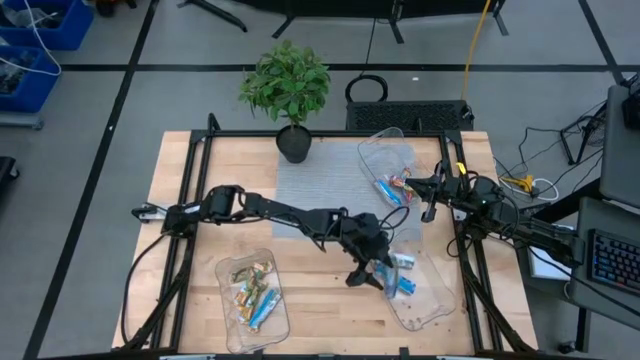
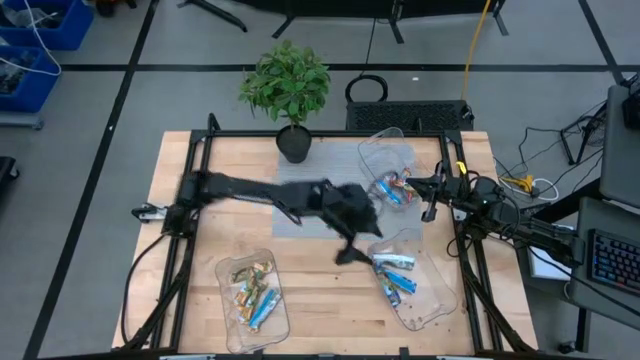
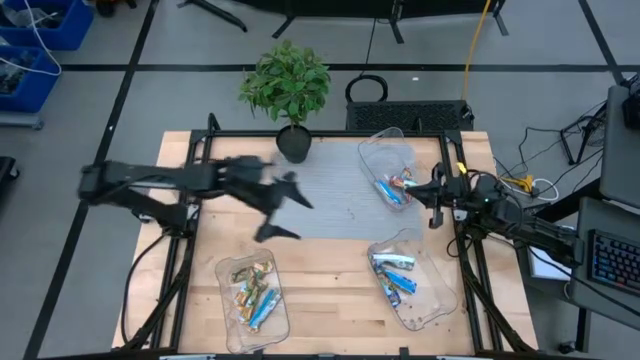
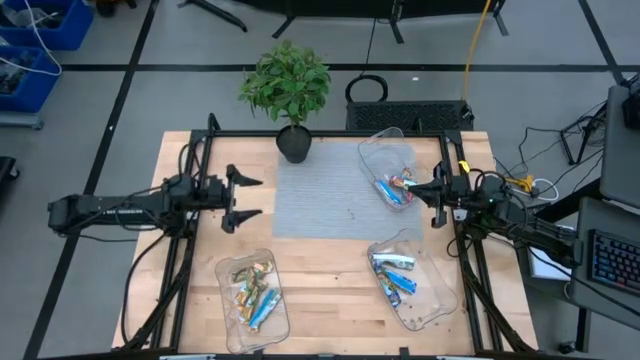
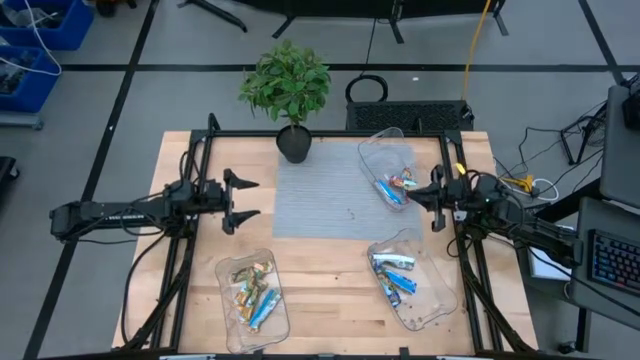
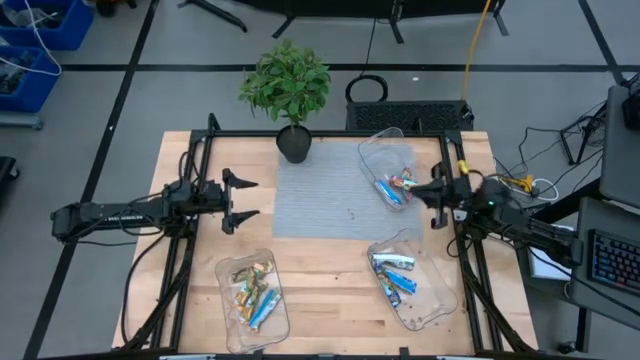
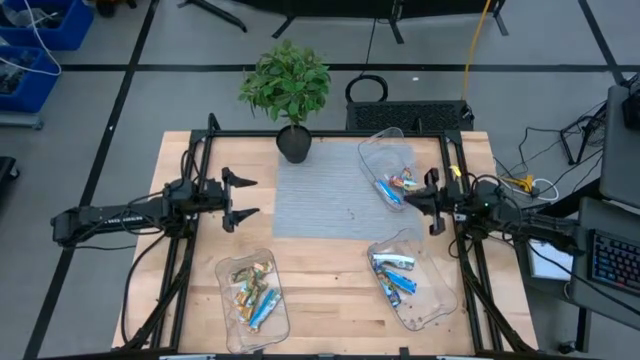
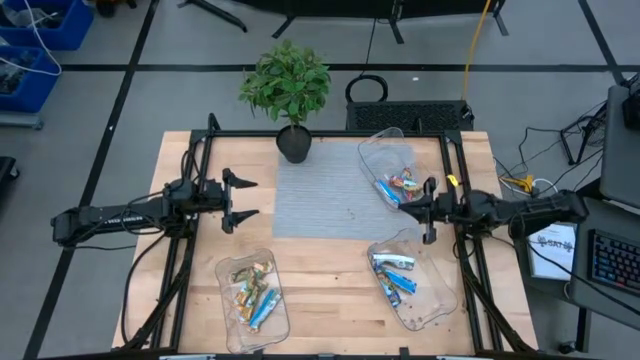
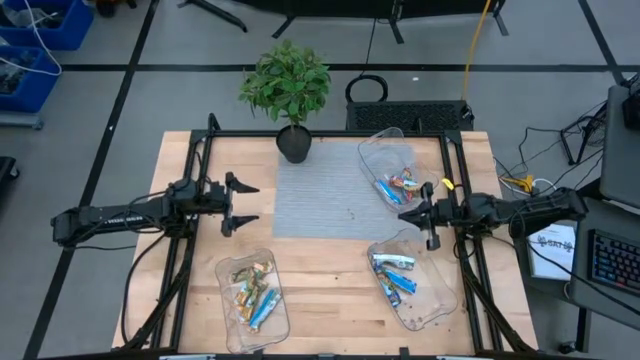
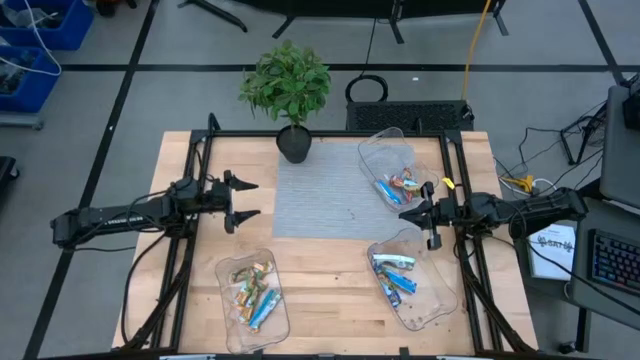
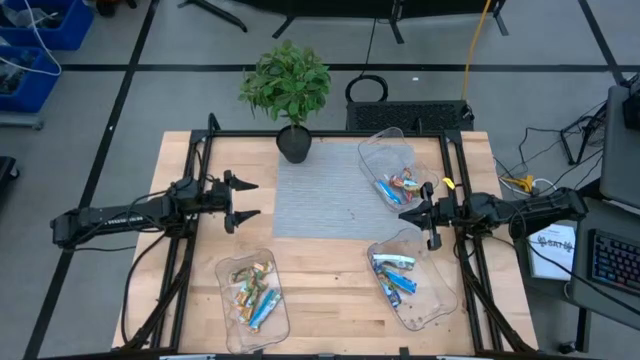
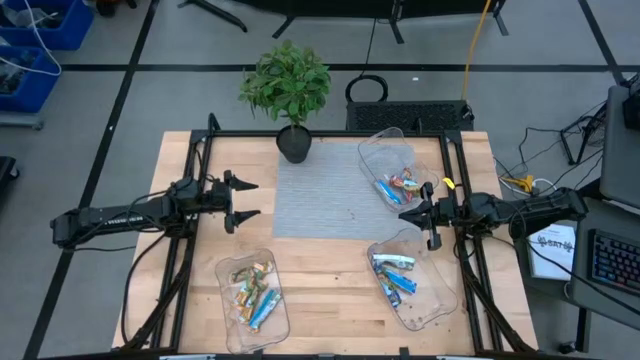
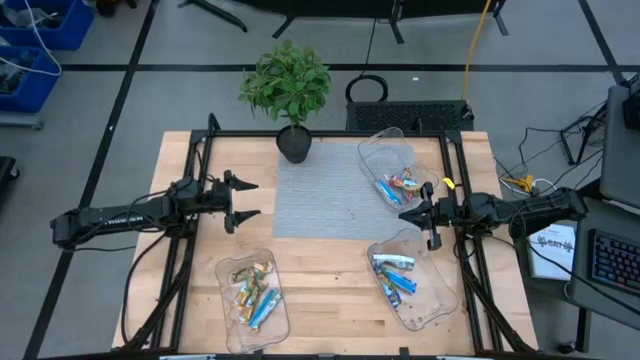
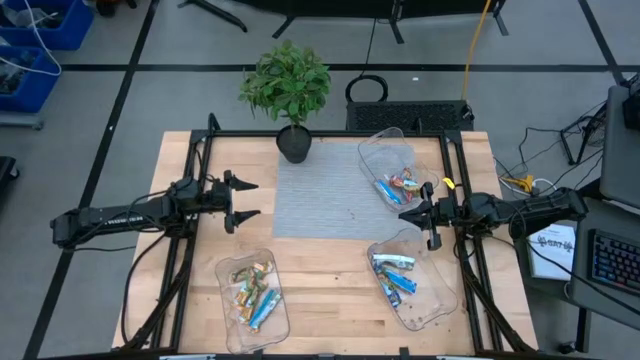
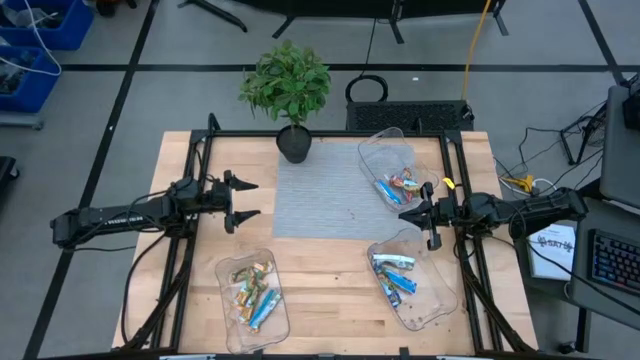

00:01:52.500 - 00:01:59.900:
Task: Pick and place Granola Bars by type
Return to Home Position

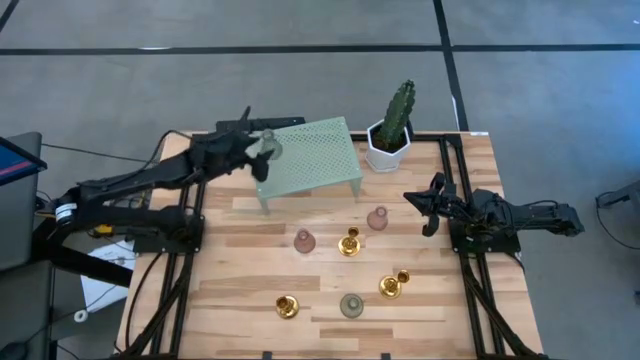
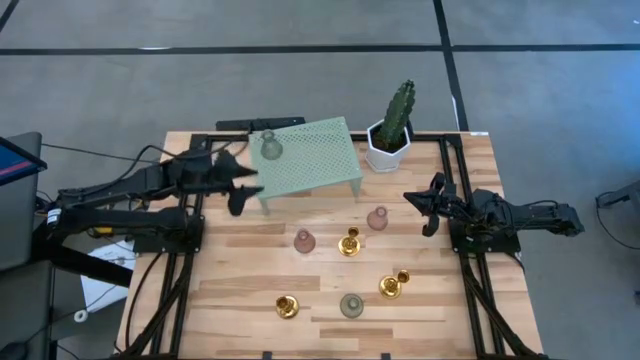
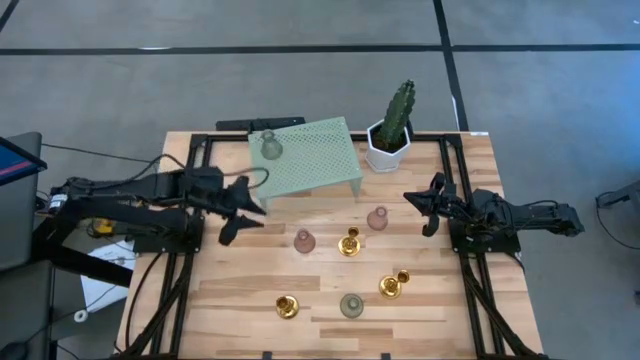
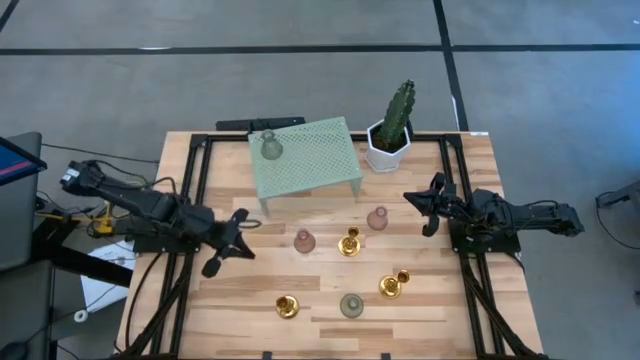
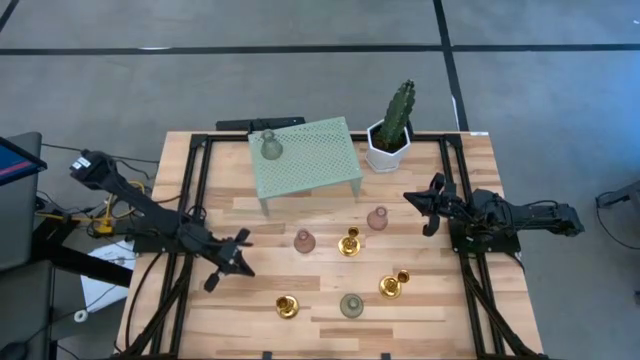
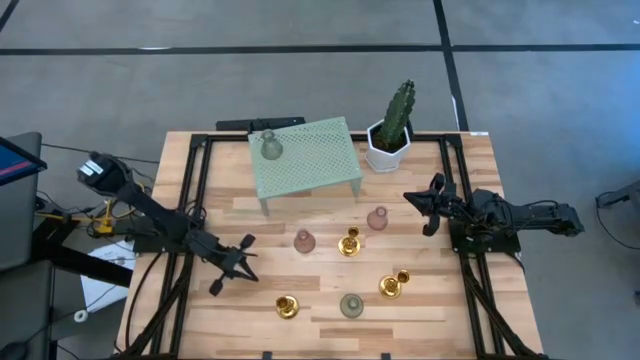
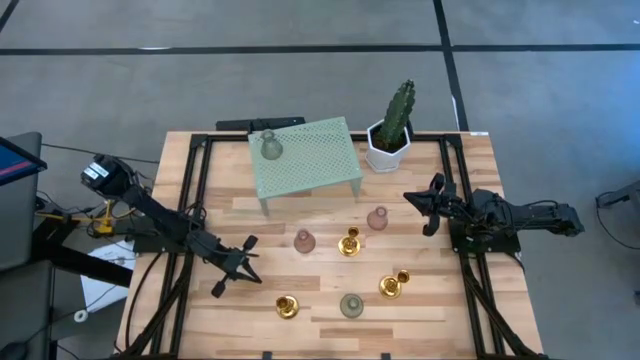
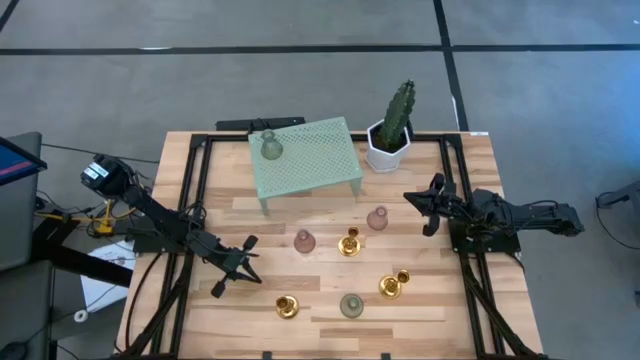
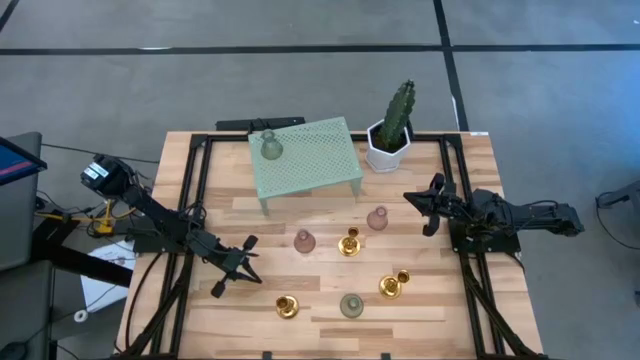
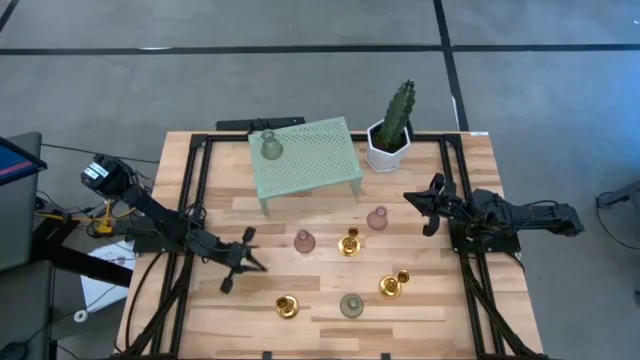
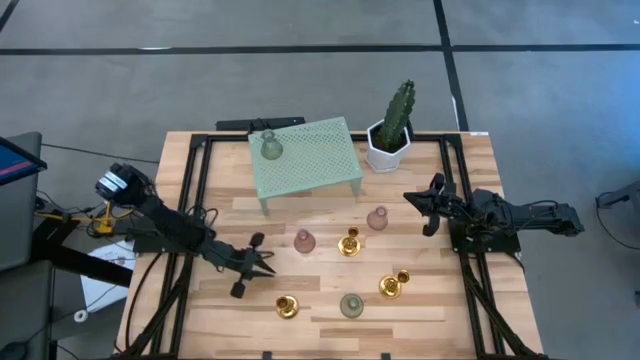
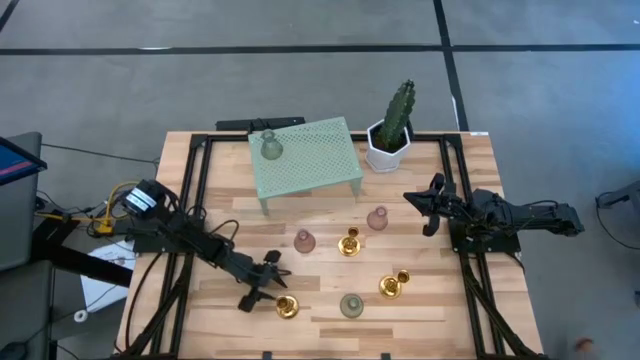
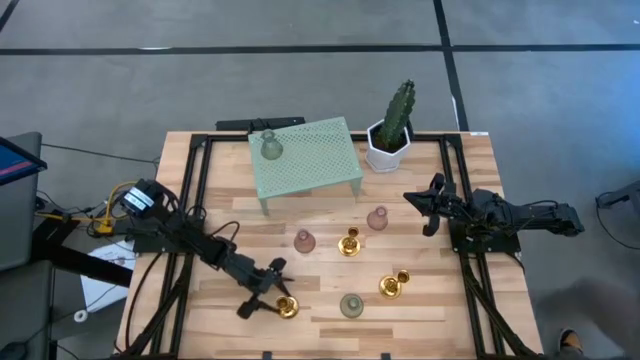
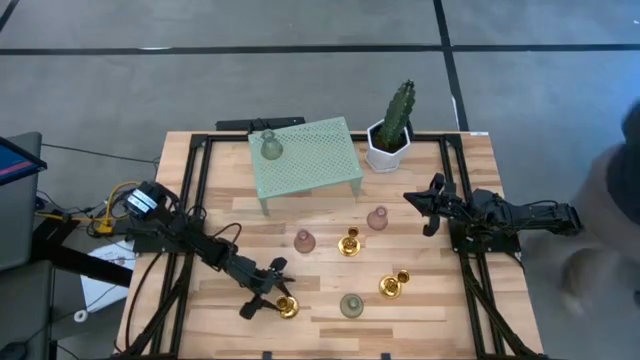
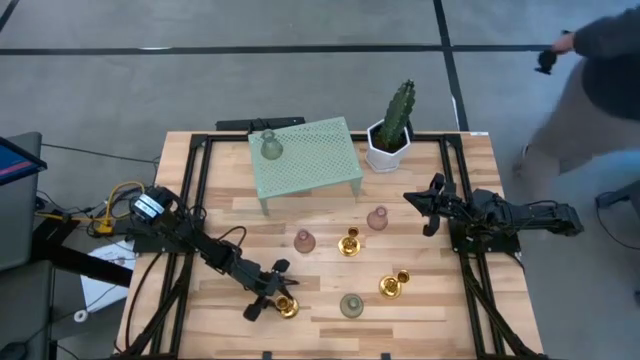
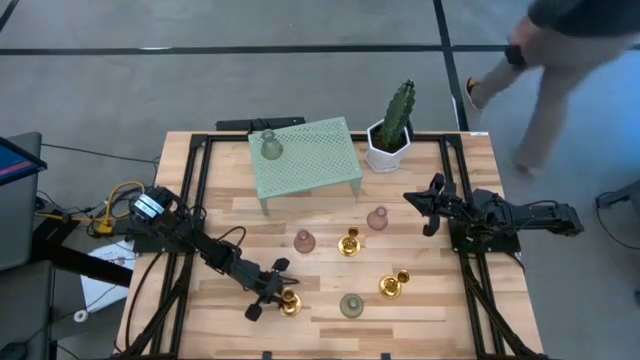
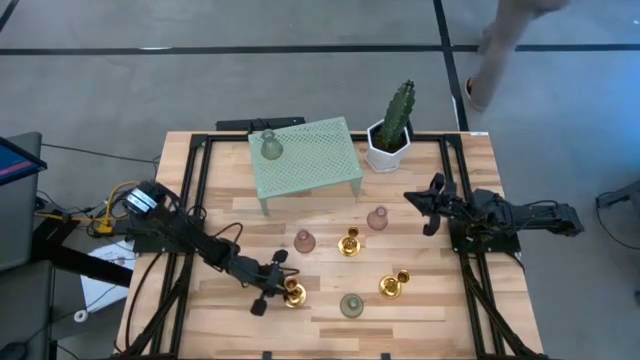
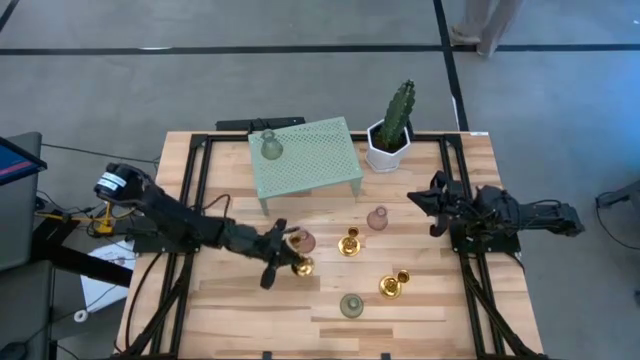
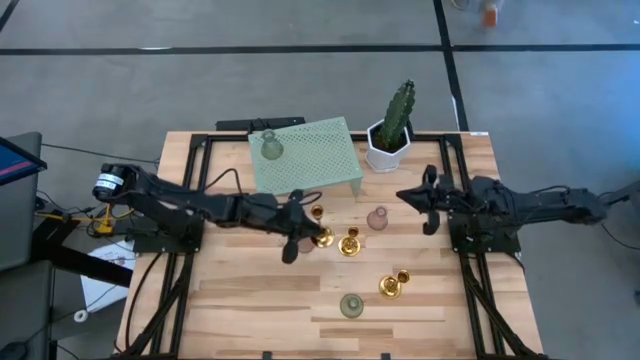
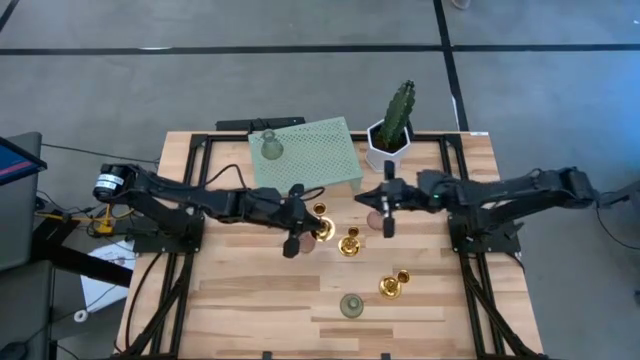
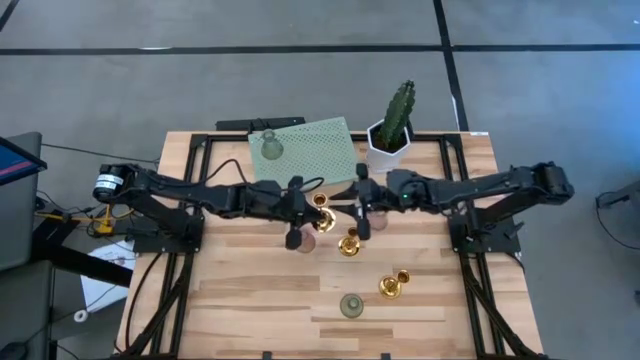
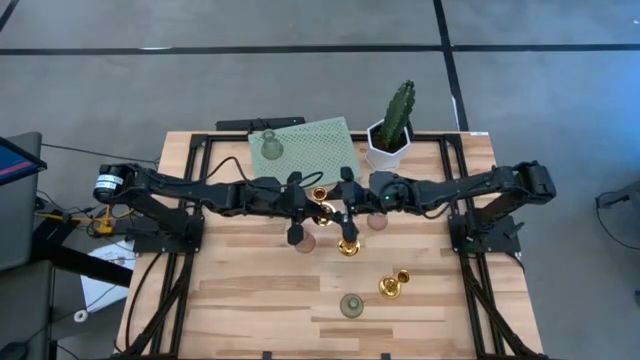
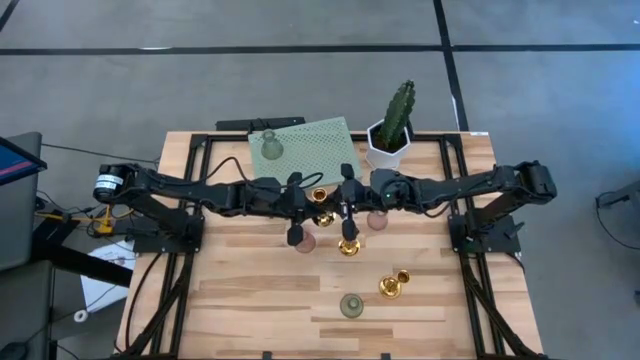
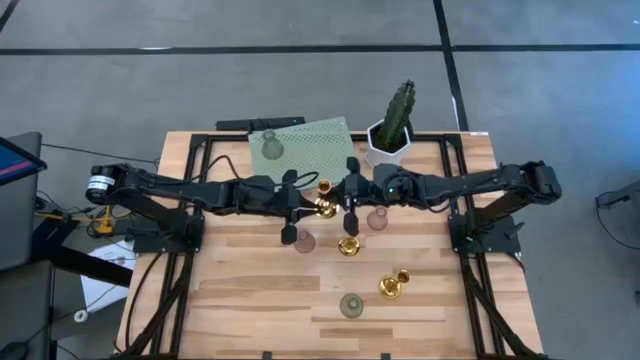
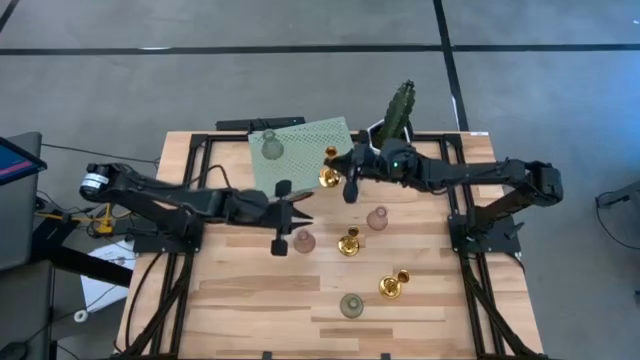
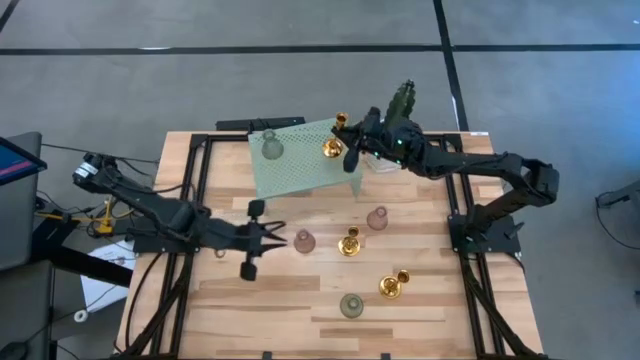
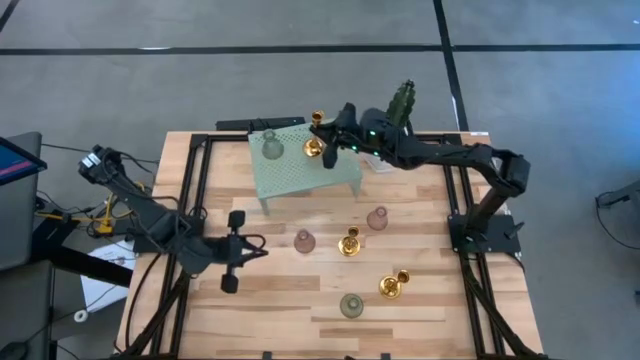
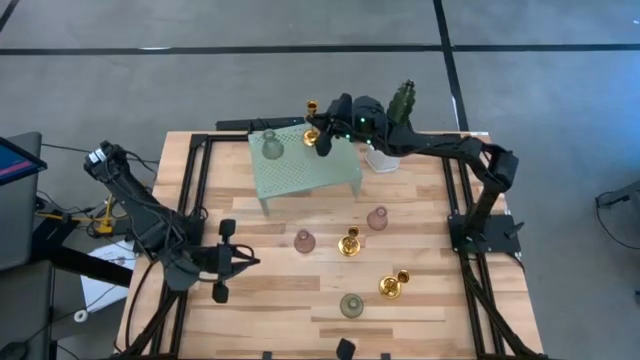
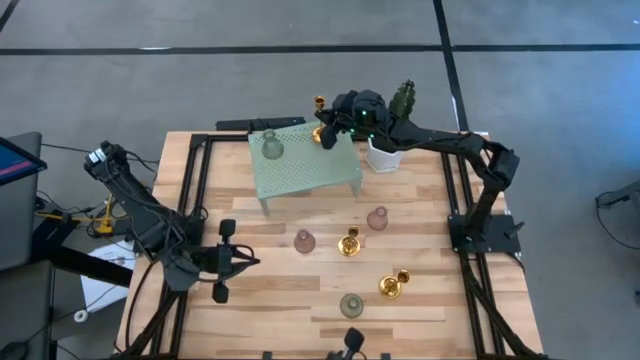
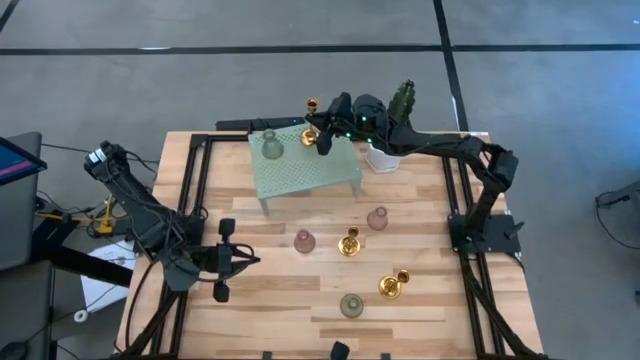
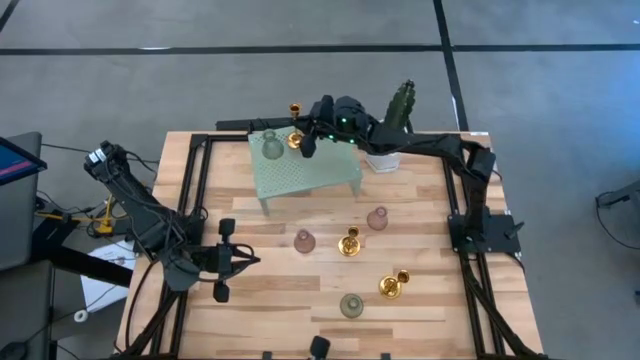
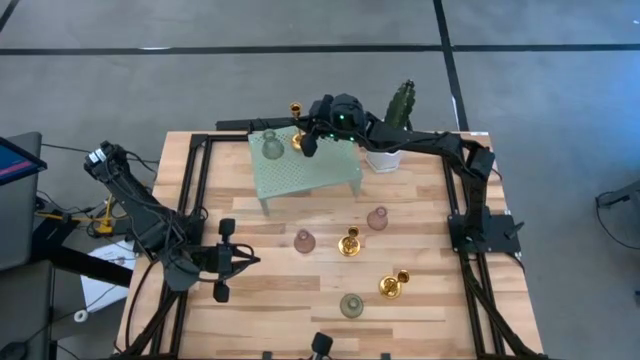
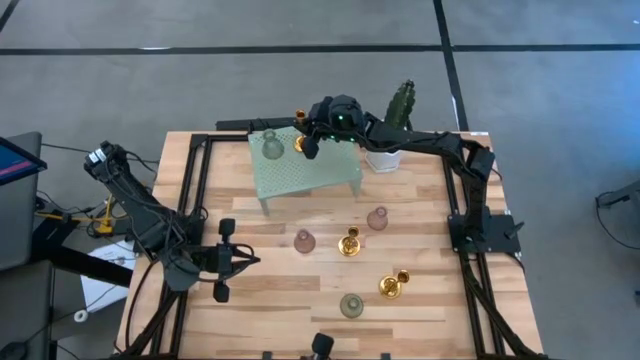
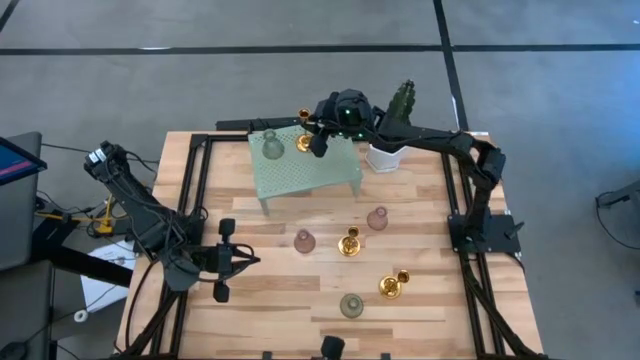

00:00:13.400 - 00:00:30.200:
Task: Pick & Place candle stick holders
Put the bottom left golden candle holder on the shelf
